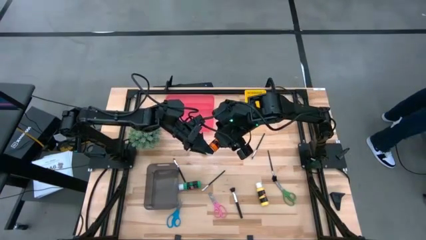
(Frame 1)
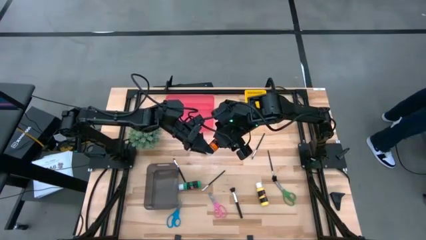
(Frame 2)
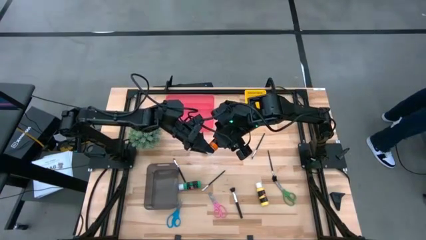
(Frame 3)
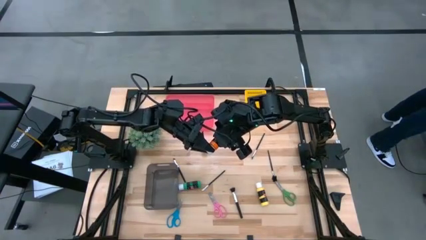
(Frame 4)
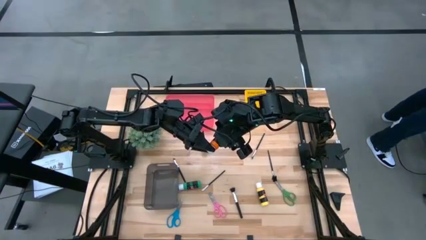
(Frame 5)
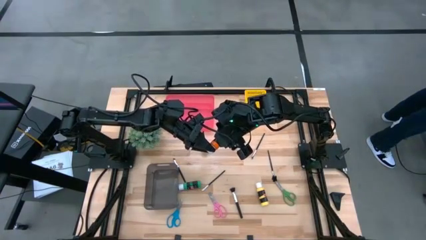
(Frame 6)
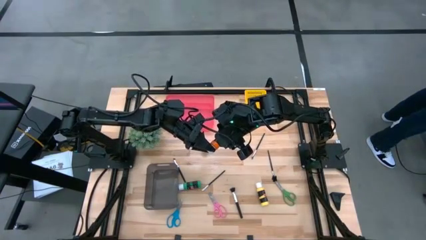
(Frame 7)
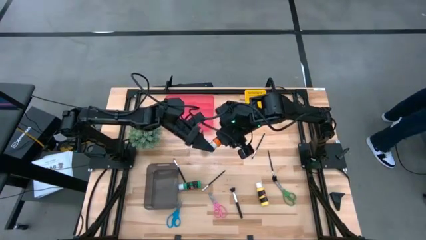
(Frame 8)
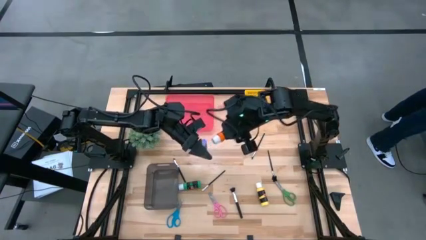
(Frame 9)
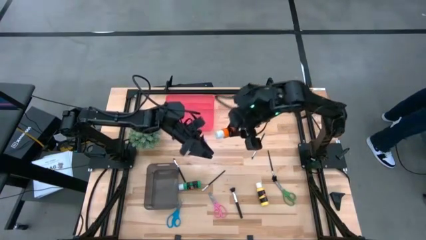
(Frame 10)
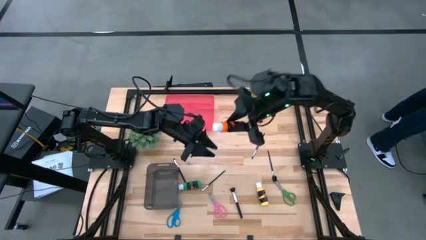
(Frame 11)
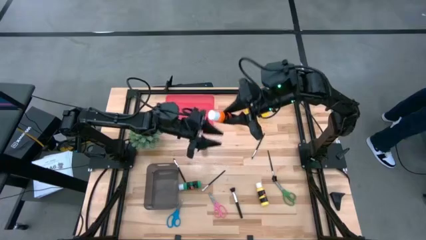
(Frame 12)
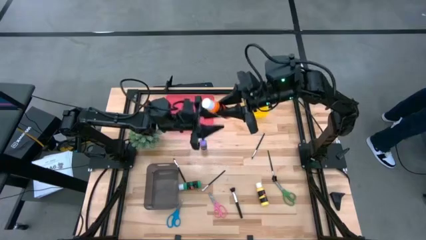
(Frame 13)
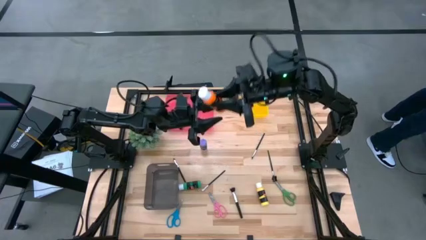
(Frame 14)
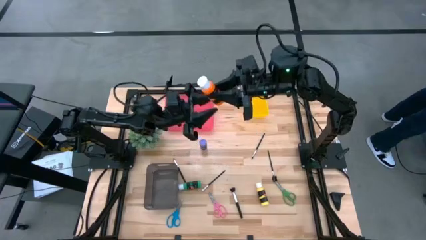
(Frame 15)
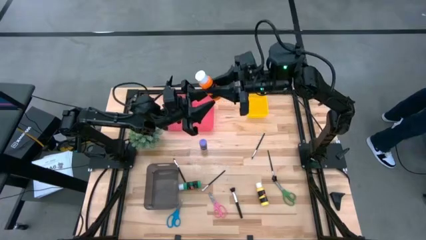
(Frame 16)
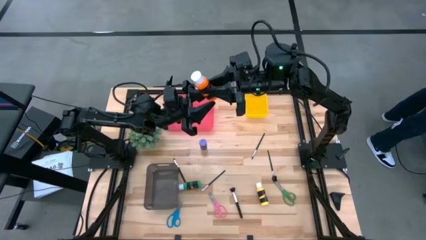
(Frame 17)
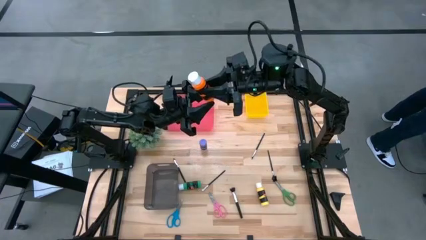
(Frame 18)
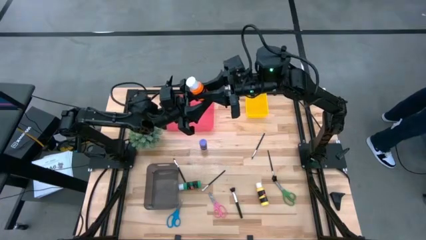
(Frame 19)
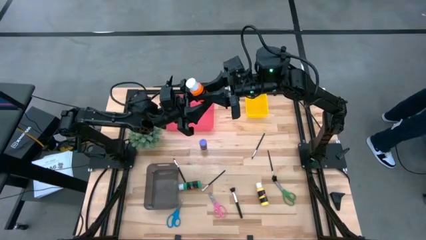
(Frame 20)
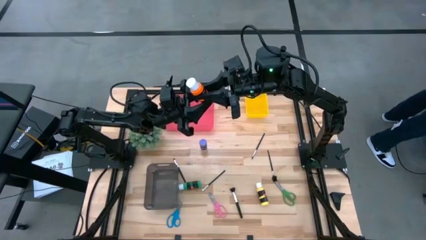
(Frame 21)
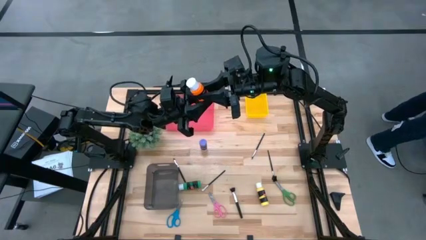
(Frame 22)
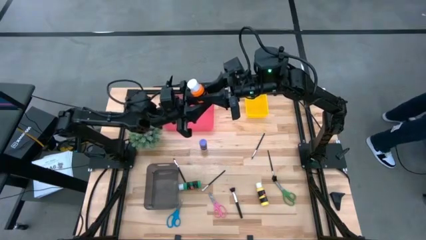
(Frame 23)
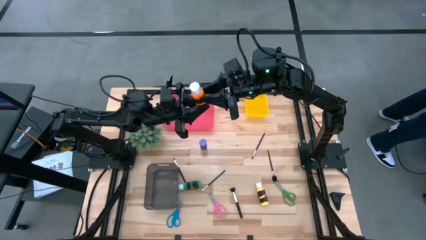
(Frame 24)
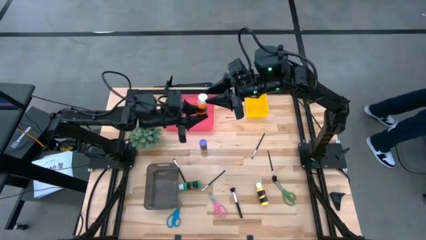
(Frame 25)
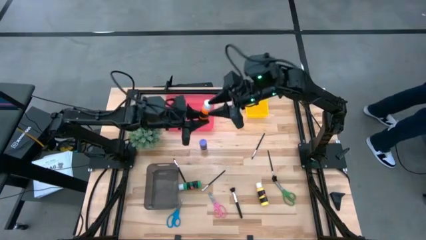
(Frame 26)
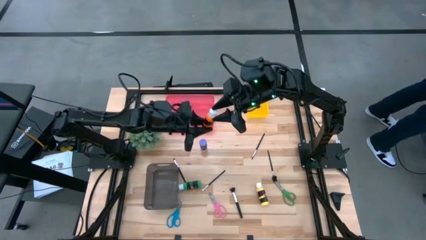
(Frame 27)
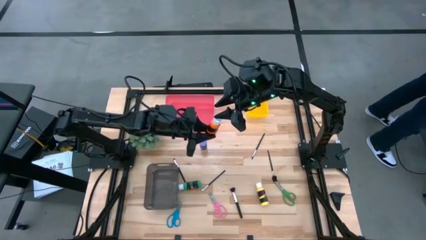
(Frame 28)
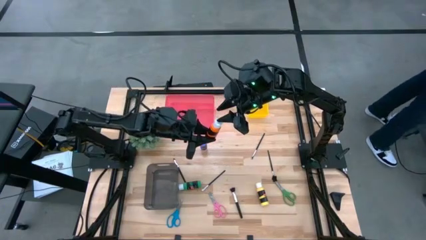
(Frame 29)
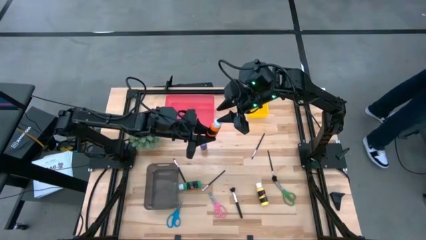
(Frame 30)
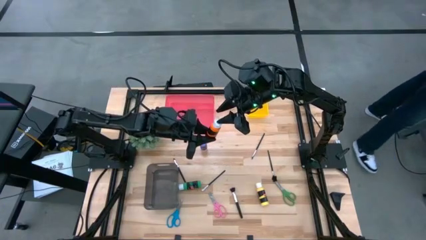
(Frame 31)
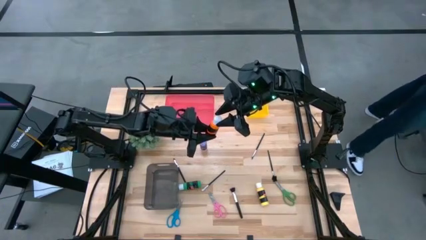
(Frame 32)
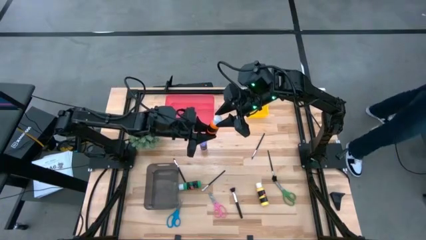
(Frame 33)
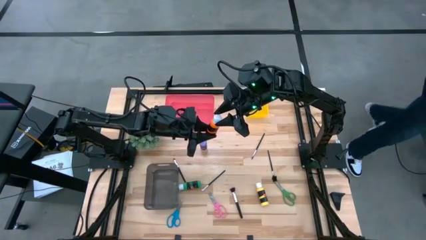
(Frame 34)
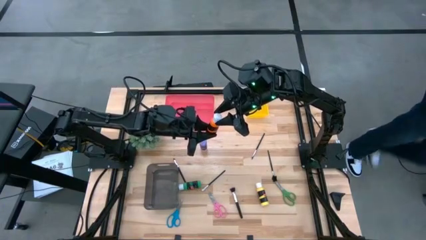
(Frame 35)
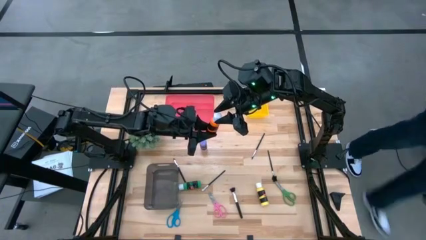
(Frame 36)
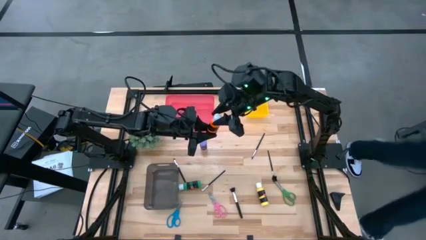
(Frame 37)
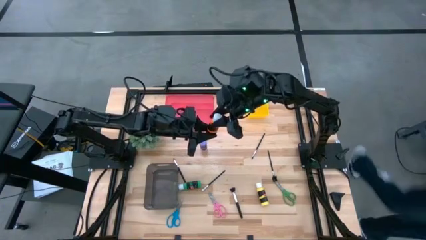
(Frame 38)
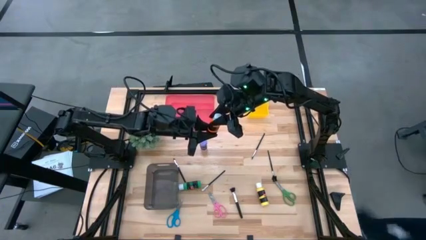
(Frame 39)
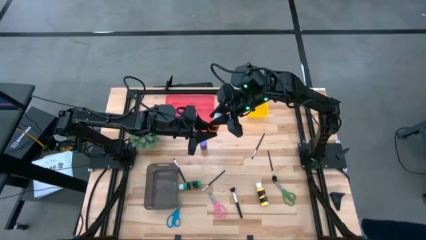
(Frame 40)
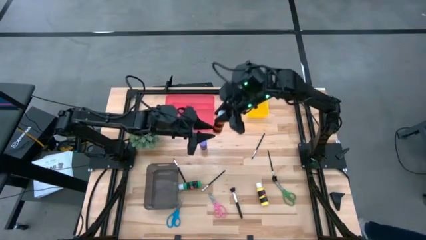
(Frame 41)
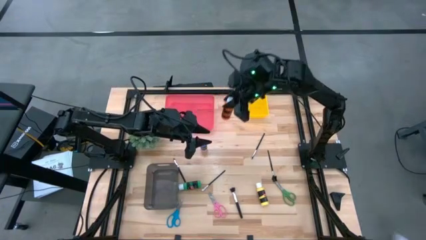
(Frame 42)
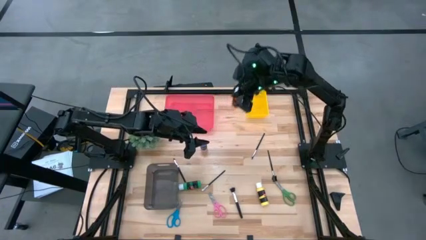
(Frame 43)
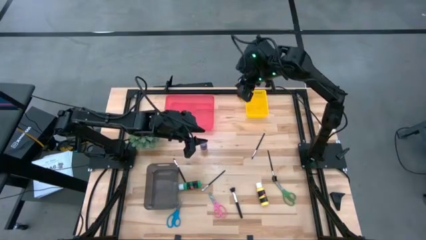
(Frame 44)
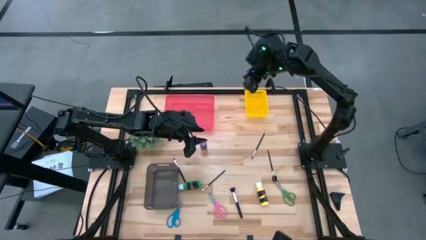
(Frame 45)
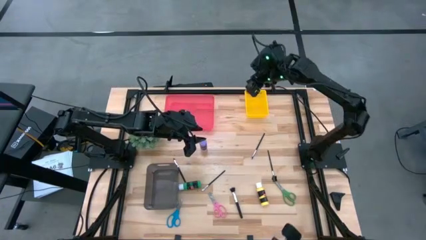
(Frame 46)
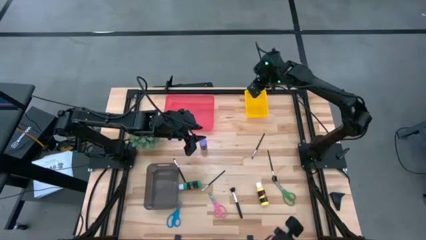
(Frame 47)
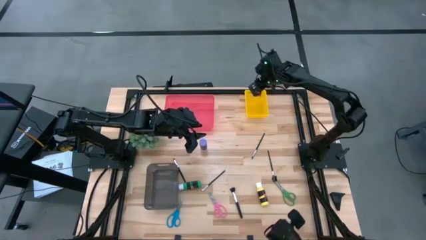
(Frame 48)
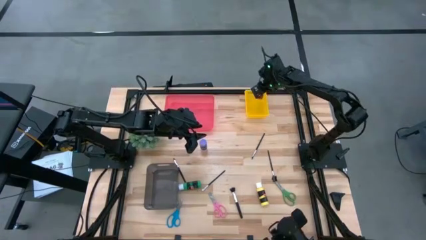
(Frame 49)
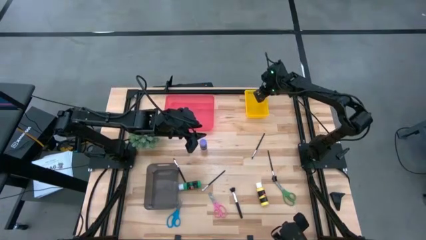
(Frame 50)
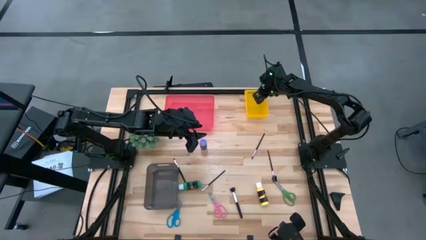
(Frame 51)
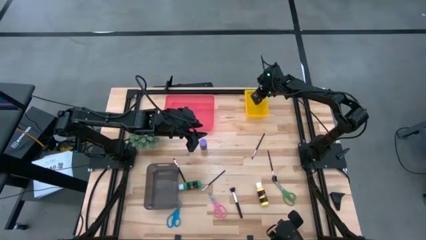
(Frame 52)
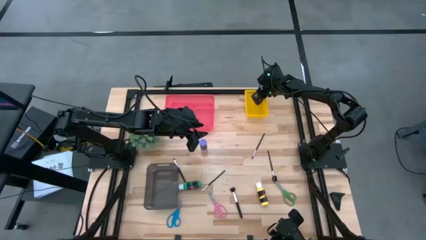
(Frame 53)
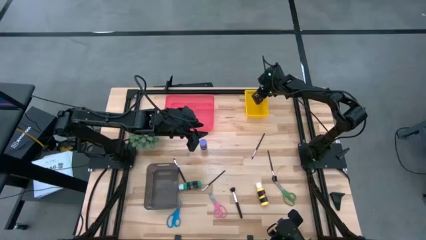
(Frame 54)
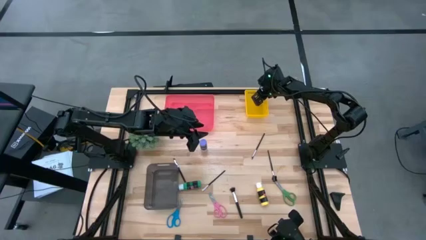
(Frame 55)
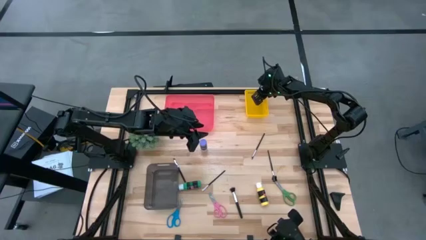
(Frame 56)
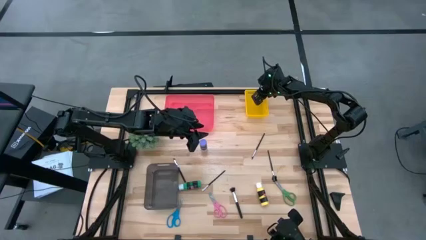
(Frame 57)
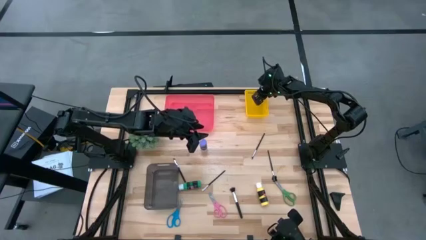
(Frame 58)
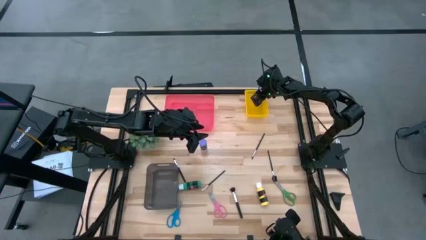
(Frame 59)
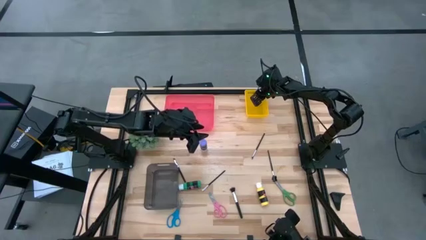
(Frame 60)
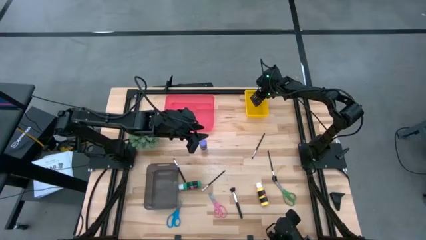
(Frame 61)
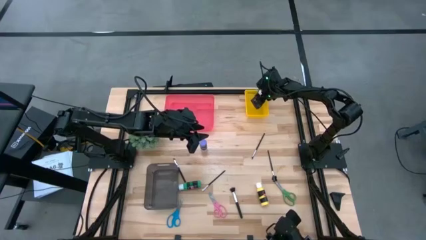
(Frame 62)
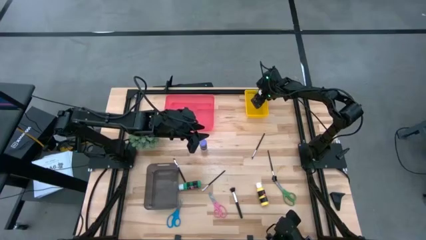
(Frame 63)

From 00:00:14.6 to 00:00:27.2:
Task: Pick & Place Paint Supplies
Put the orange paint bottle into the yellow bin

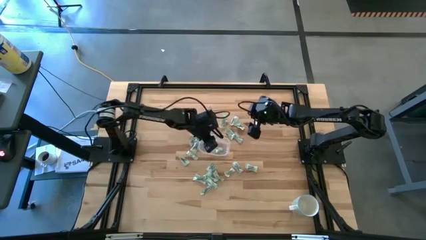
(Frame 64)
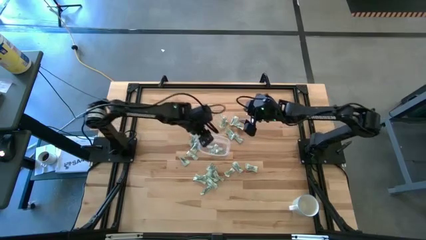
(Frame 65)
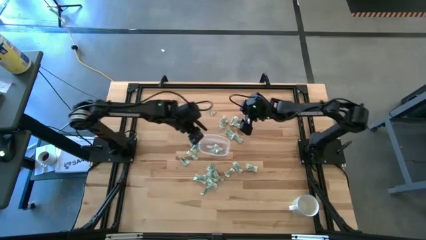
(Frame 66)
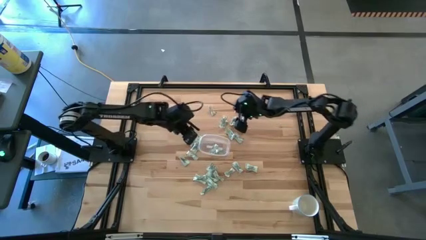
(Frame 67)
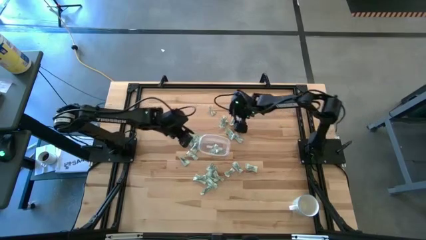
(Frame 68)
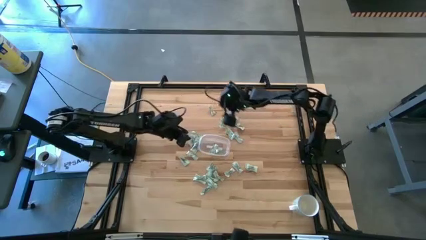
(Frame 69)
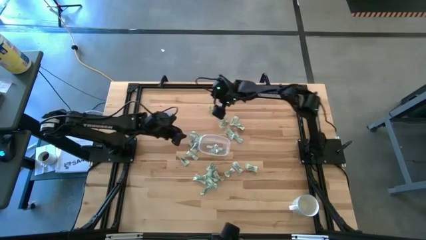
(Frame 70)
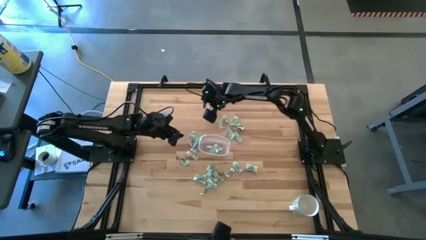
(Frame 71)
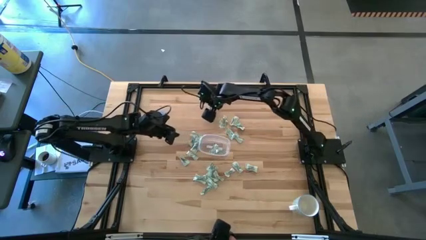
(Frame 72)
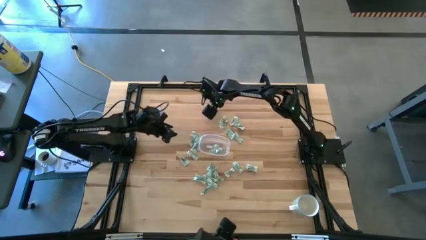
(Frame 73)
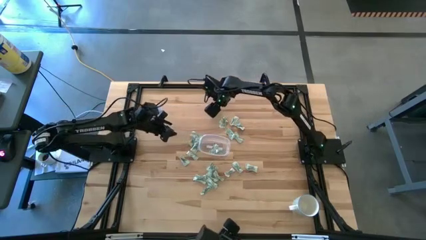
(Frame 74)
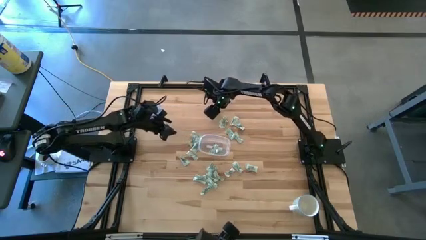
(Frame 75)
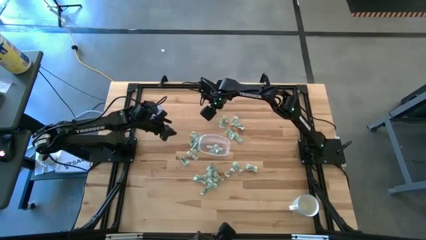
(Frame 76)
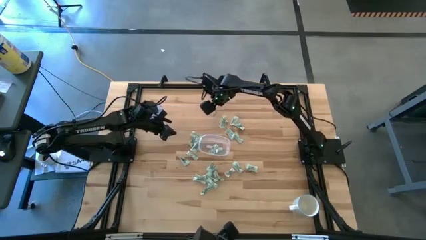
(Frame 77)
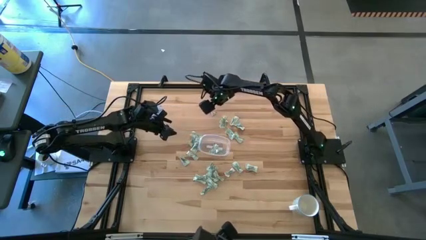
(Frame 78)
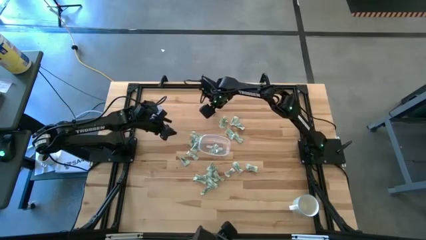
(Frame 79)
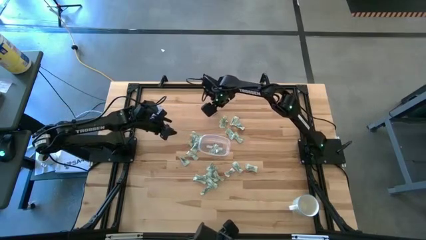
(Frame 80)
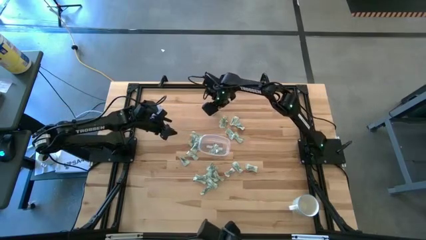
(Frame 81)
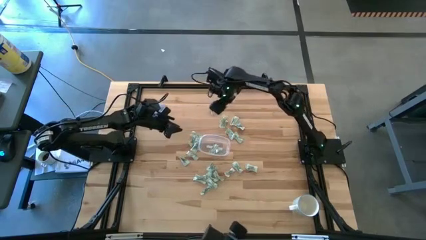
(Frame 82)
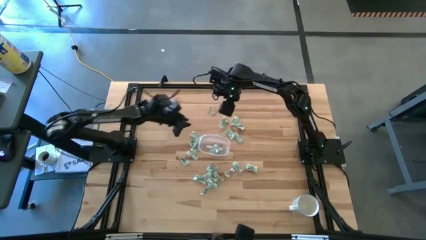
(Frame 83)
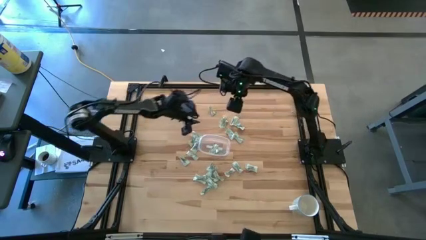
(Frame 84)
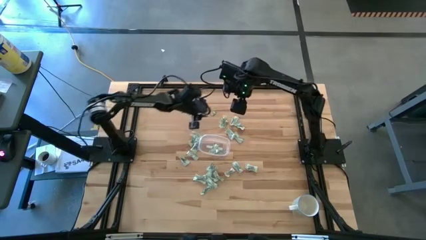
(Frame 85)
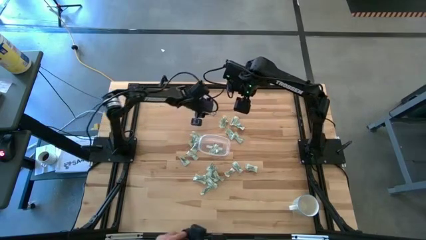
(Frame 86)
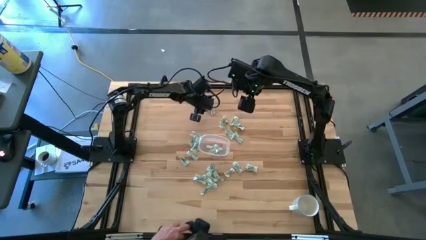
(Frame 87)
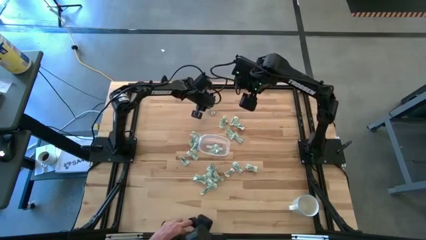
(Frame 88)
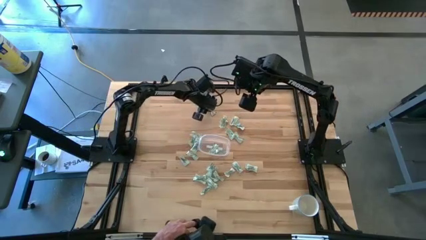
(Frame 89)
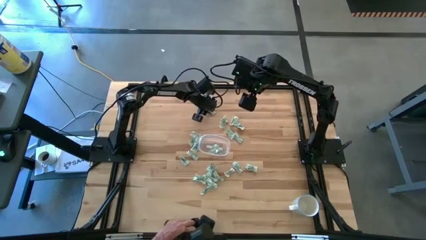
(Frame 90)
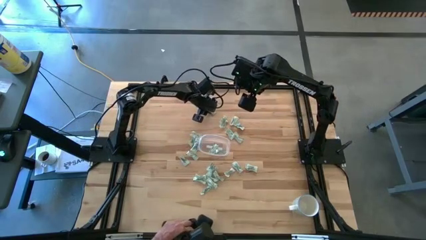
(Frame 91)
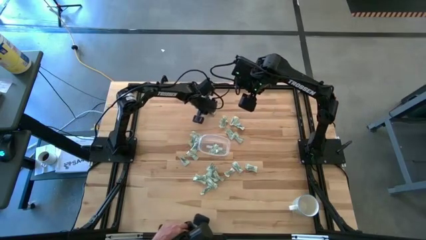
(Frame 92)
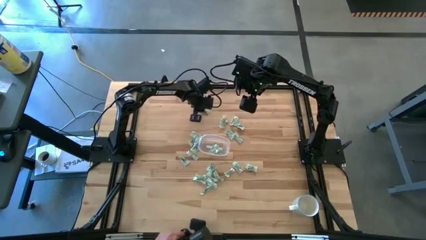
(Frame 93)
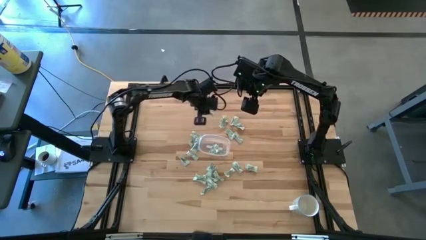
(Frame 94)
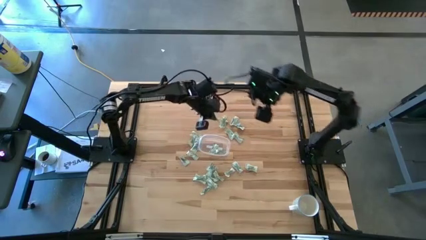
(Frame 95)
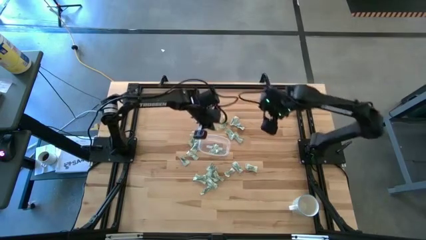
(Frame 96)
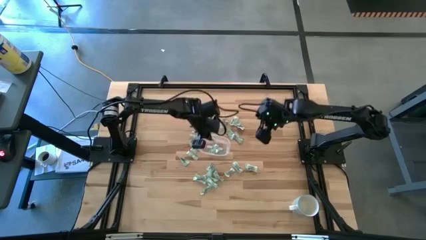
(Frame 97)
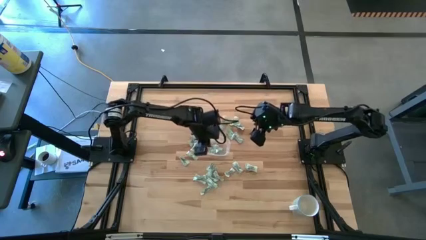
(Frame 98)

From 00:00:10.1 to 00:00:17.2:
Task: Pick and place Stevia / Truvia into bins
Put the stevia packet into the transparent container
